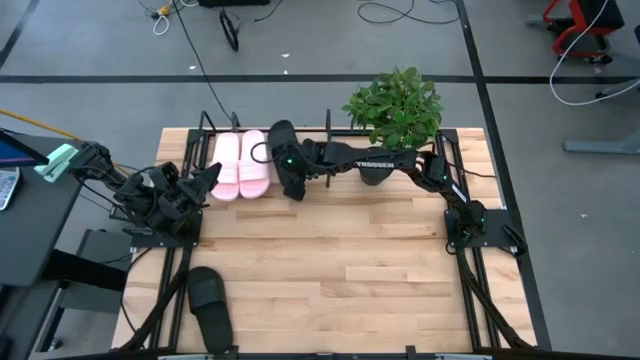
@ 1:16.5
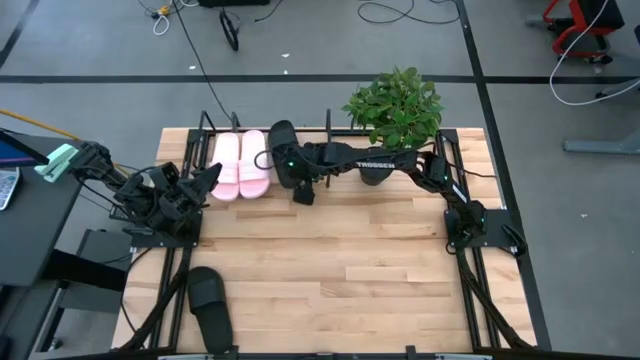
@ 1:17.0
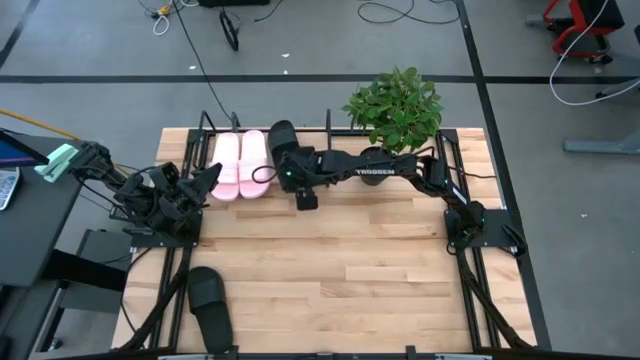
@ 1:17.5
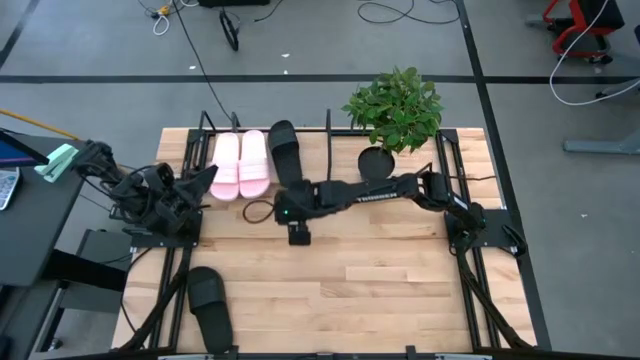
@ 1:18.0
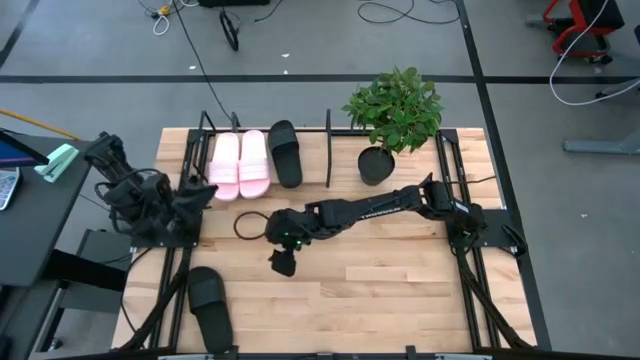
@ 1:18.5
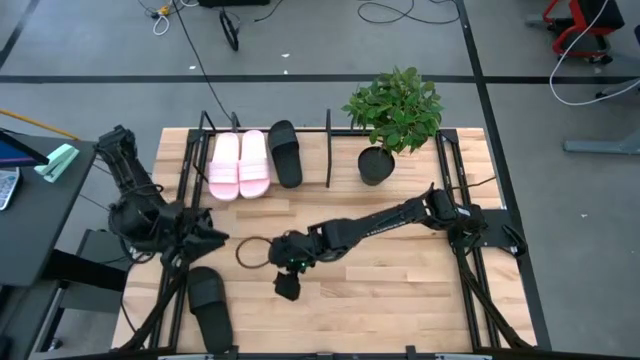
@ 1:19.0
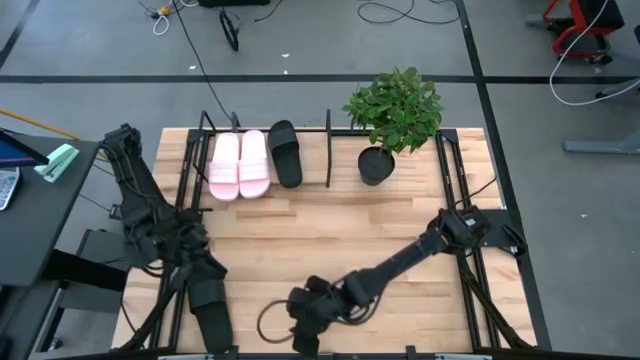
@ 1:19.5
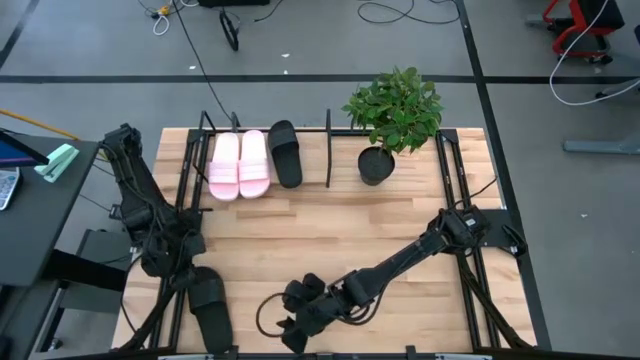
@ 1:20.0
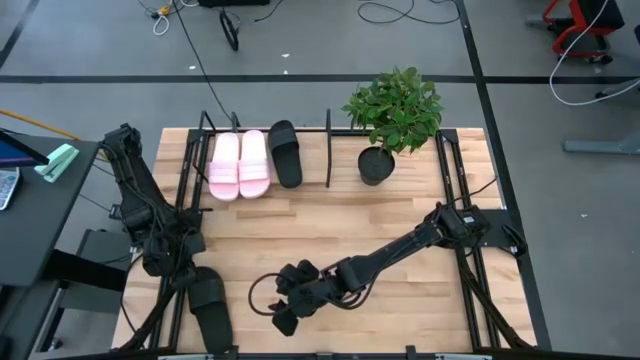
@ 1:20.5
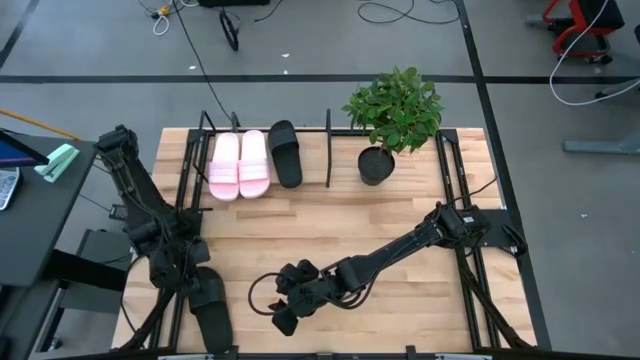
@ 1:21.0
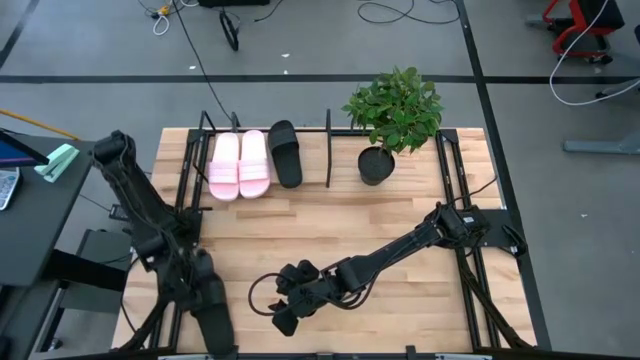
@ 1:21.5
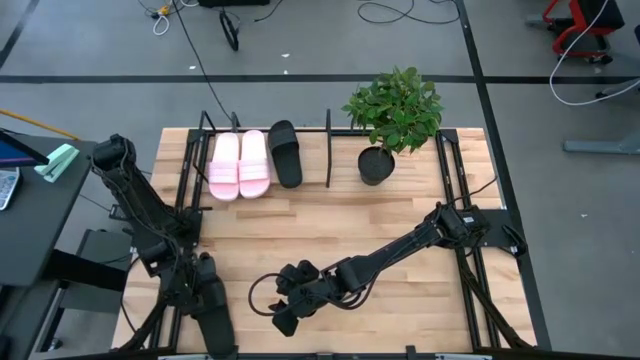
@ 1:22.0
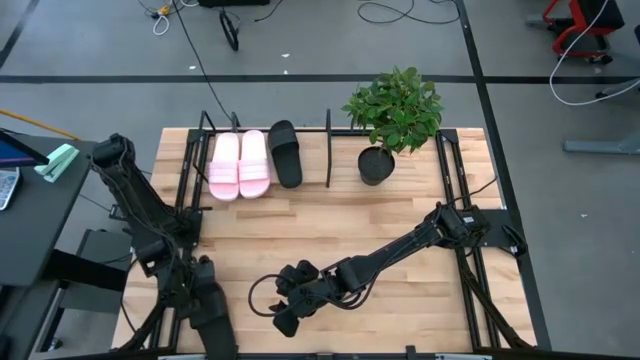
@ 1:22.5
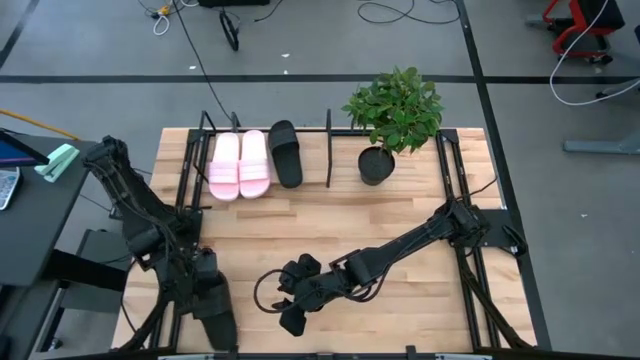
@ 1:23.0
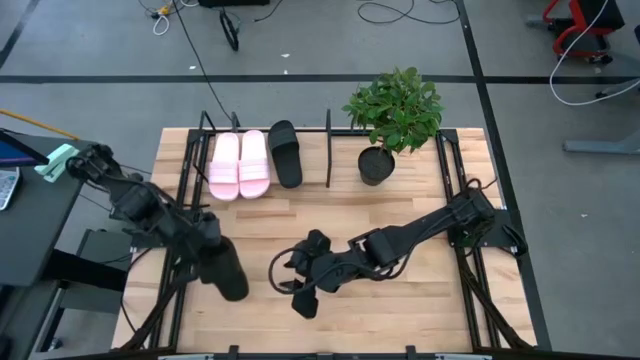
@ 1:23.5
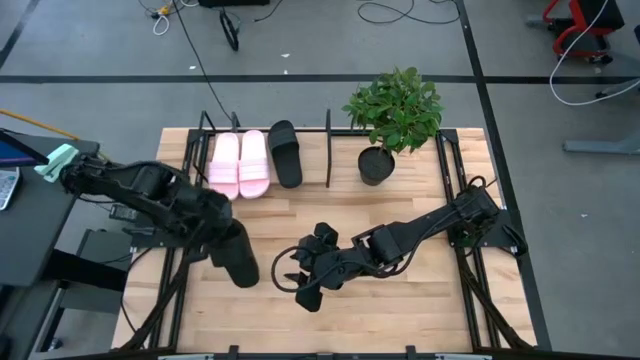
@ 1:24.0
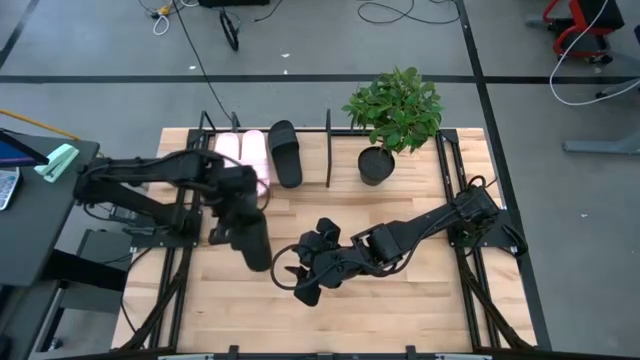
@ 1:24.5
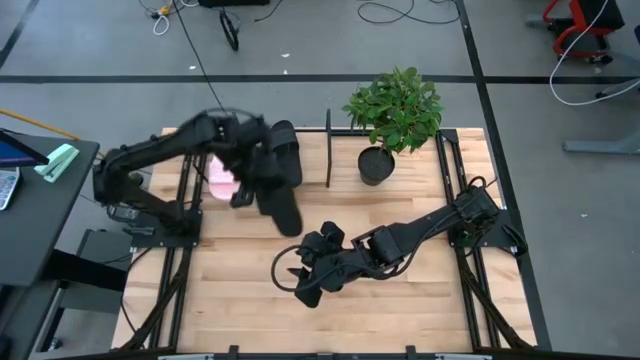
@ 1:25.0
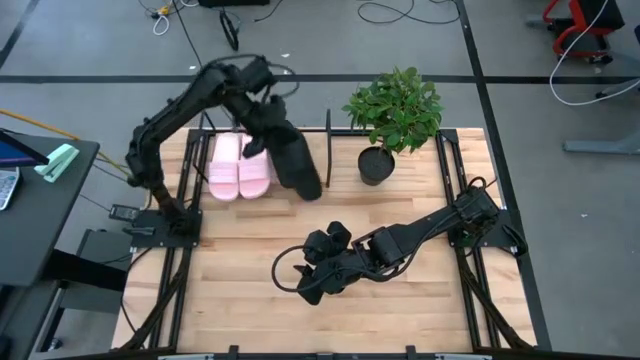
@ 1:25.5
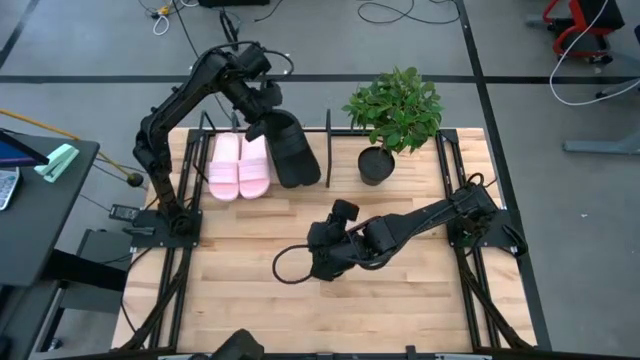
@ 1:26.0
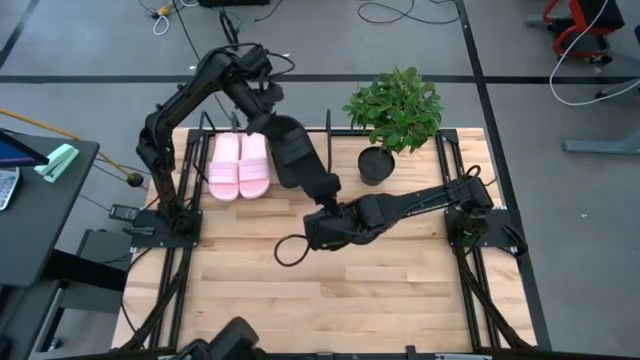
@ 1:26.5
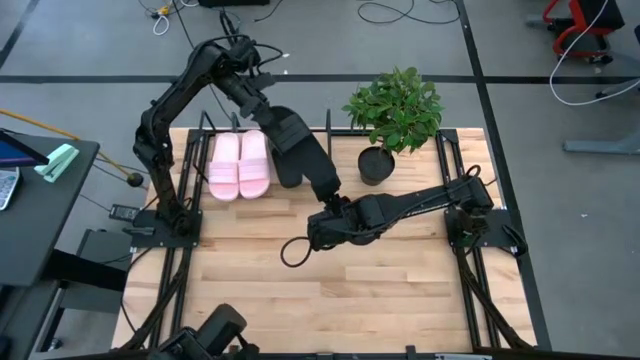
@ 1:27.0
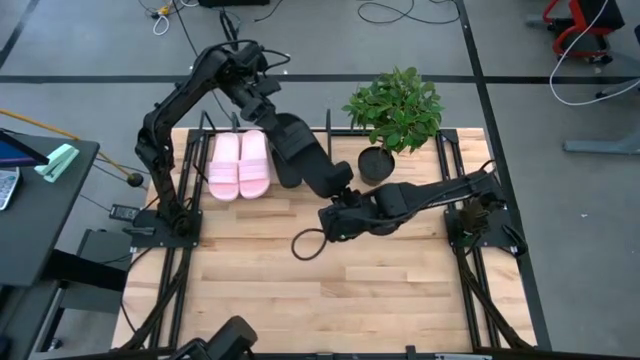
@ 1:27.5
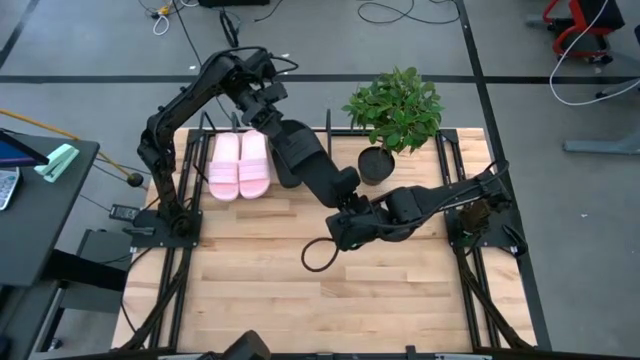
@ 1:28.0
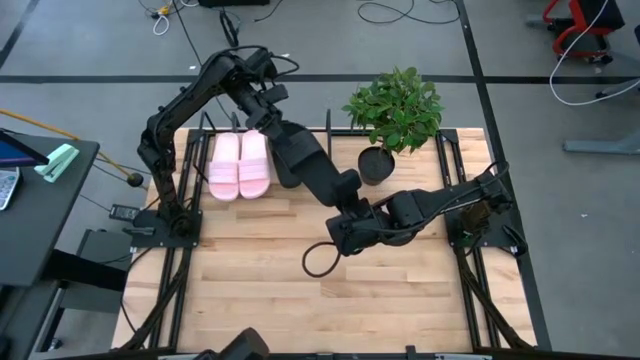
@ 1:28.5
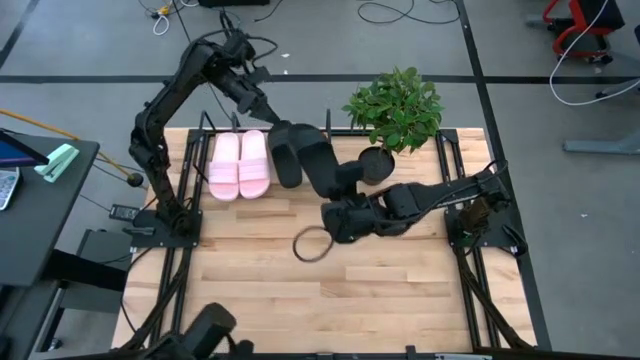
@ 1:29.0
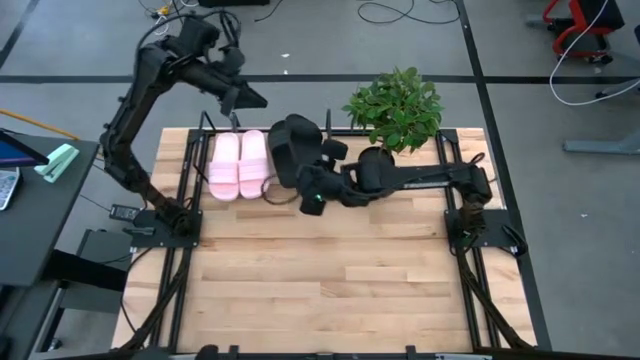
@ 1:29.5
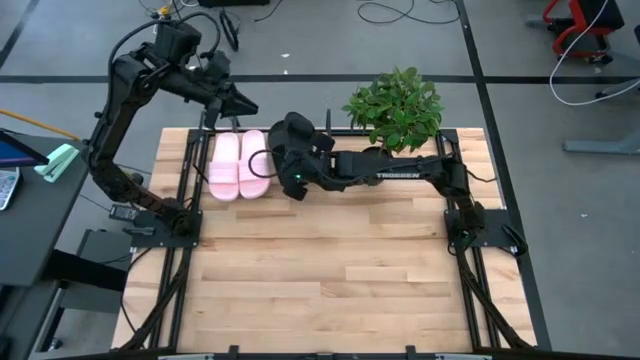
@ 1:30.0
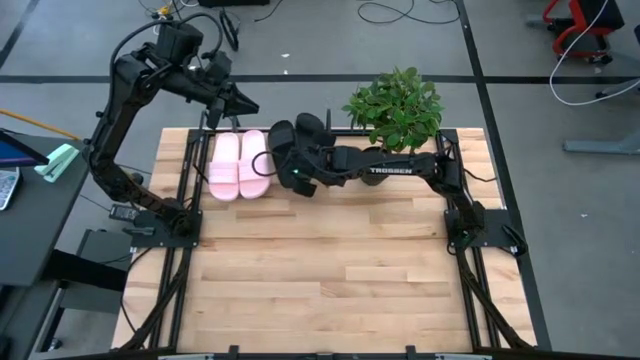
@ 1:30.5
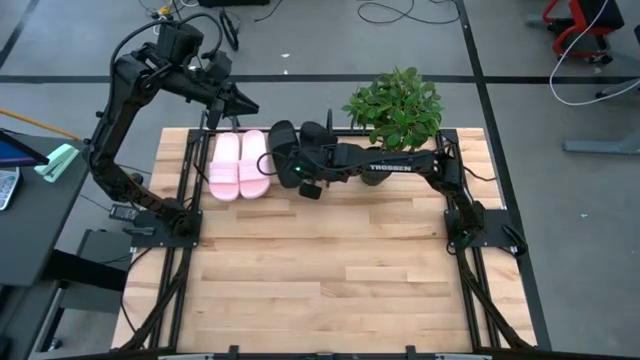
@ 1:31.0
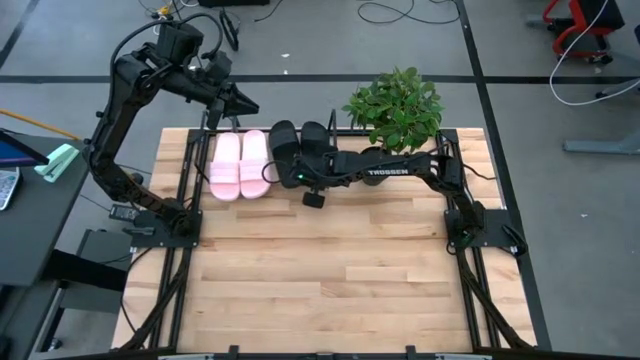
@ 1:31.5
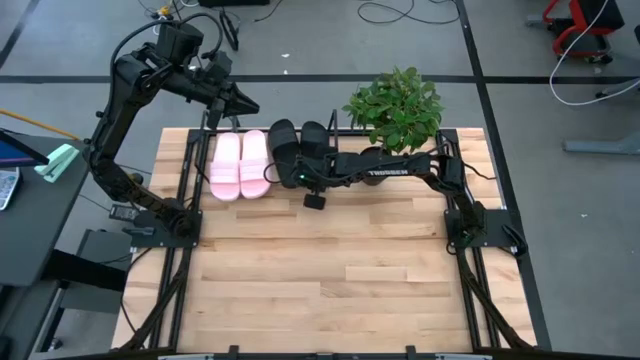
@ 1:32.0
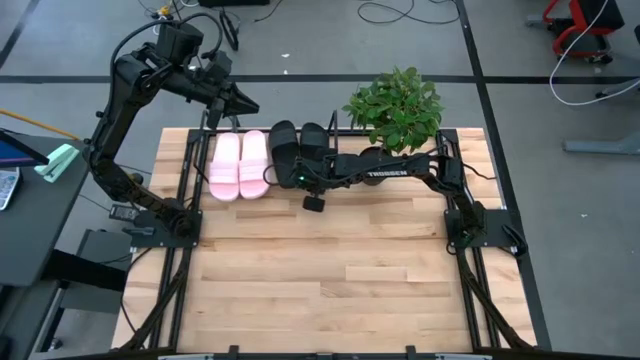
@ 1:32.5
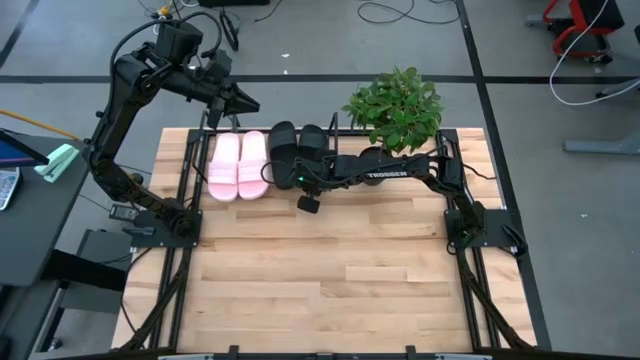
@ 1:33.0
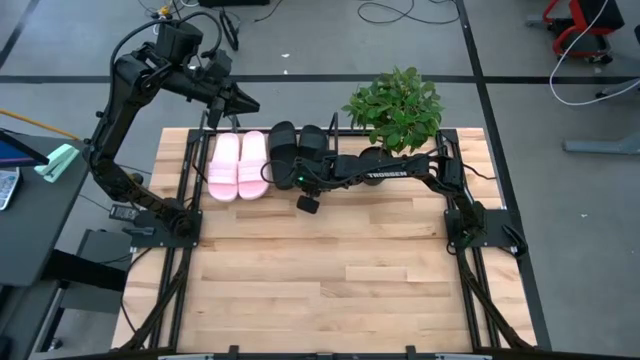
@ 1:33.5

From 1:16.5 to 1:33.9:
Task: Pick and place slides into the shelf
Put the black slide on the shelf

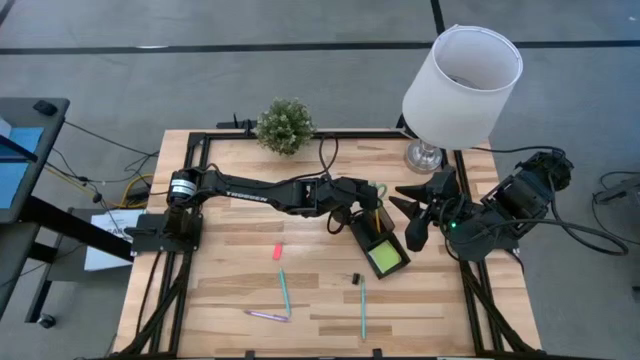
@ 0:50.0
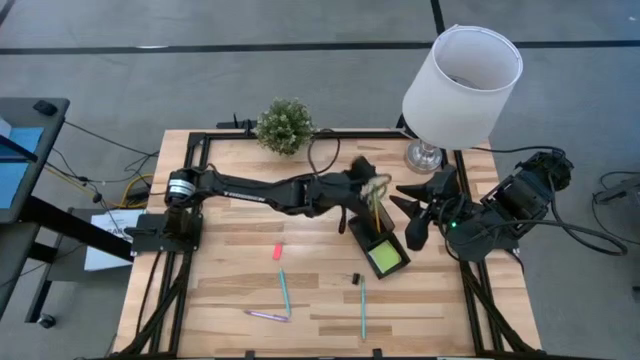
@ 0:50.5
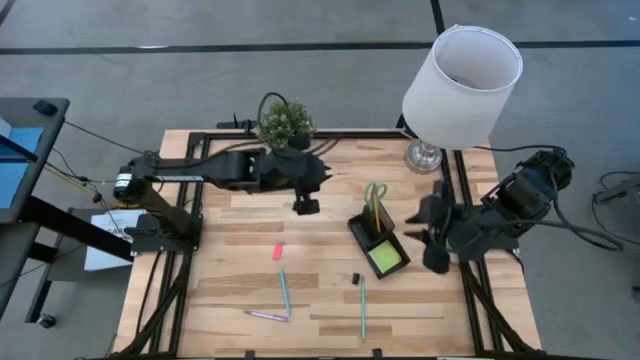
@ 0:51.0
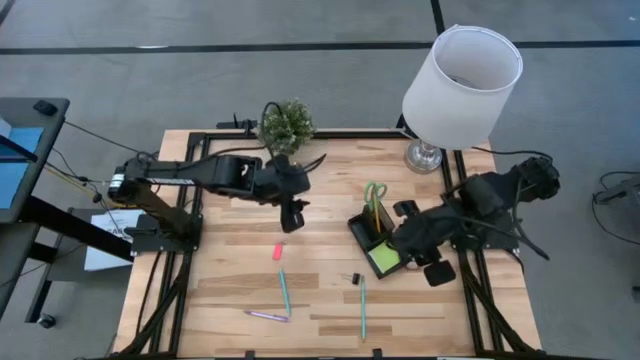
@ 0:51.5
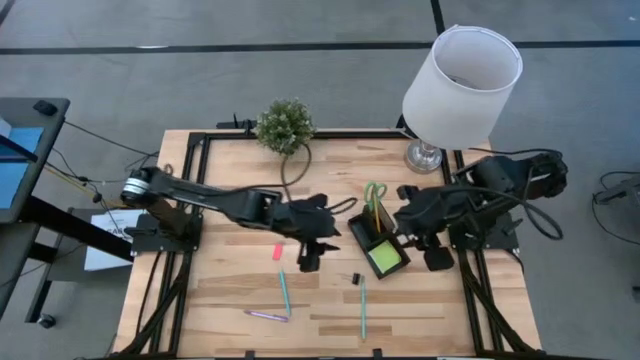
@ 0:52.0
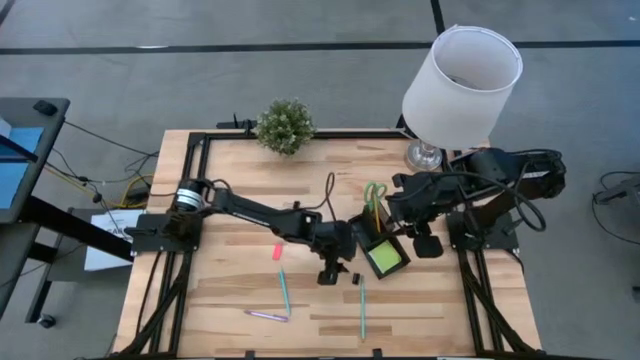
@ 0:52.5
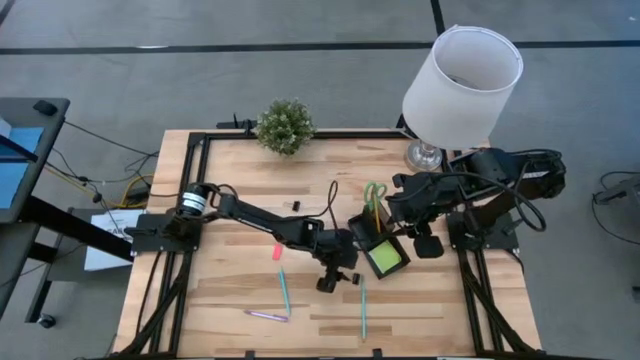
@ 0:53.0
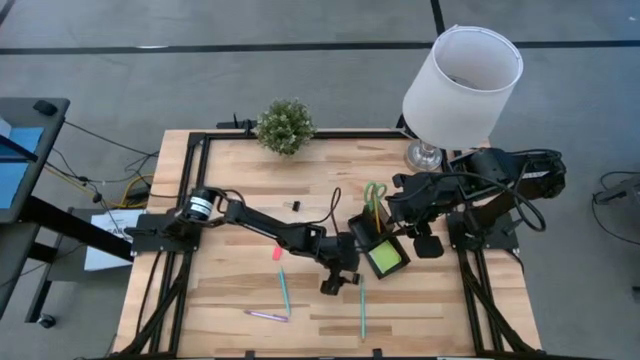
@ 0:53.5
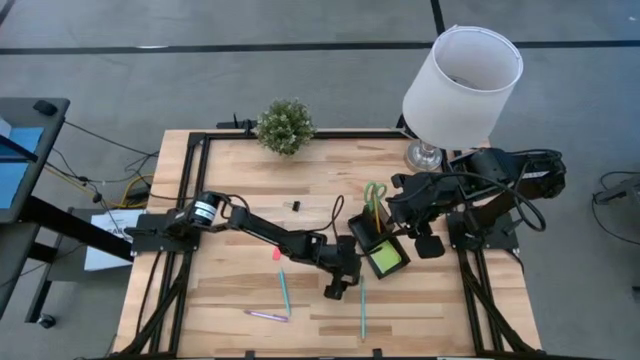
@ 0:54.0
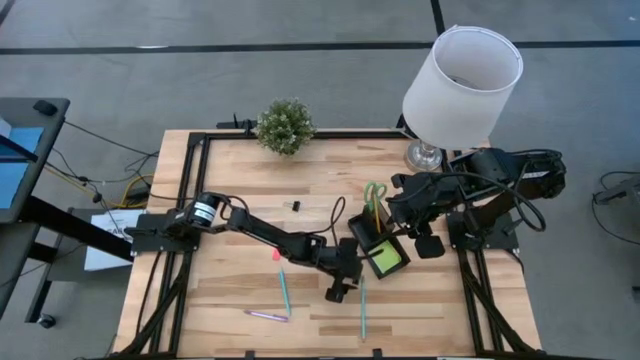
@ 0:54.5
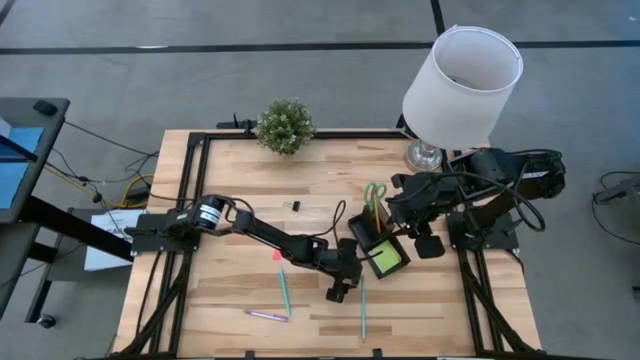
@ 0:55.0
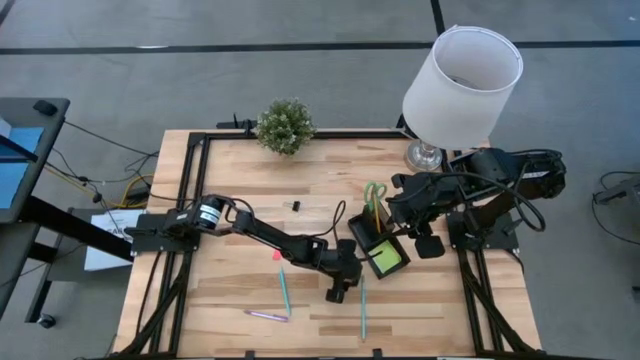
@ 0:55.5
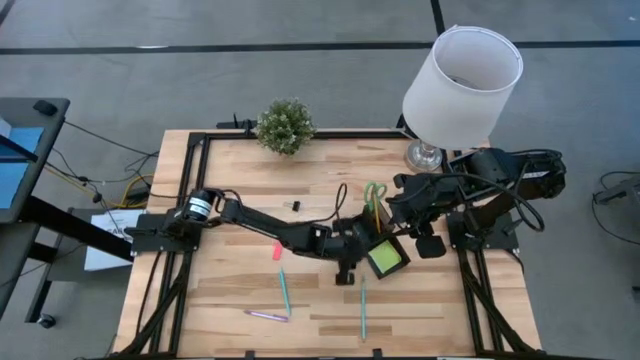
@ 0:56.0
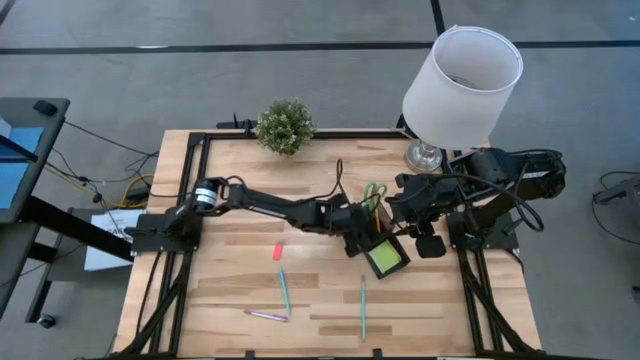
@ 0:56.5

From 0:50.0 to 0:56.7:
Task: Pick and place office supplies into organizer
Put the bottom black binder clip into the black desk organizer
